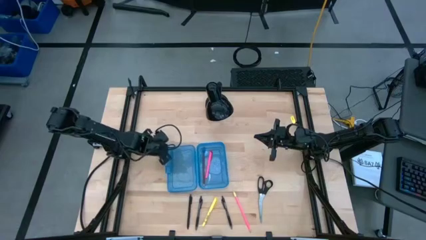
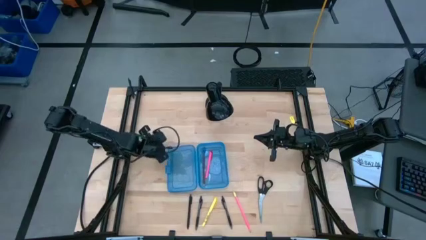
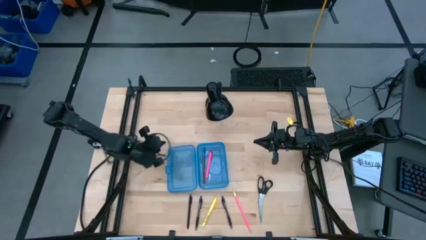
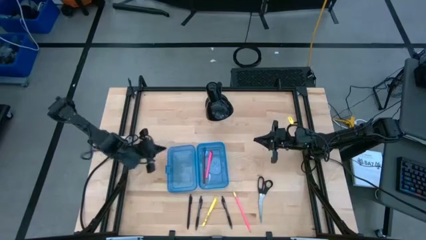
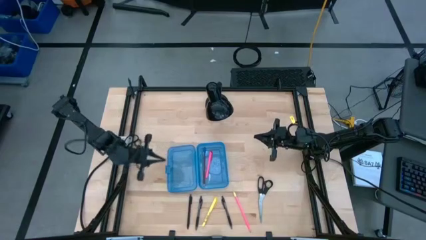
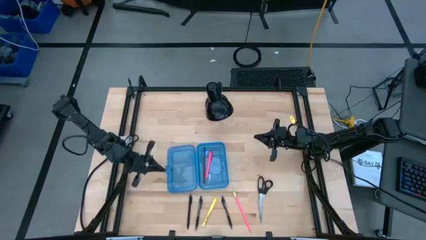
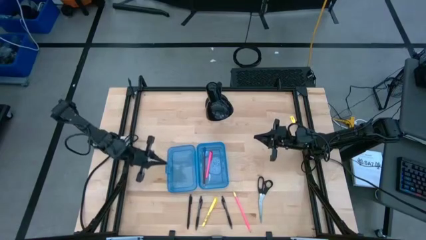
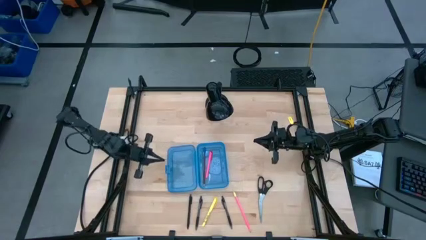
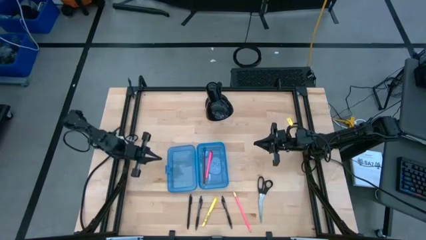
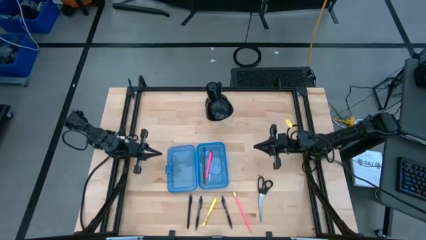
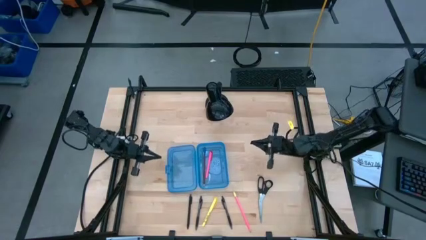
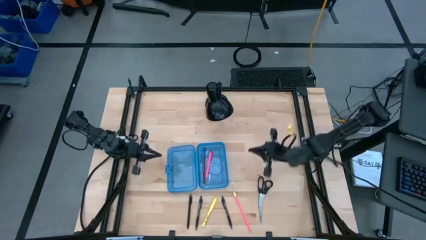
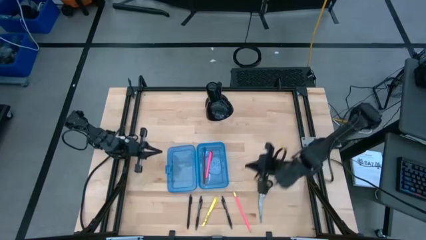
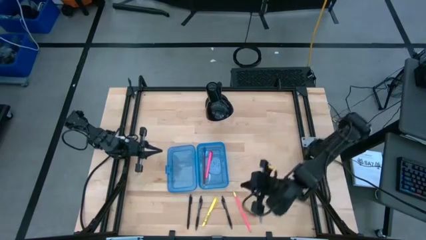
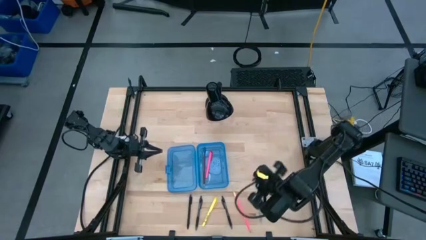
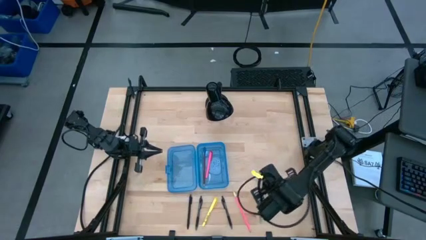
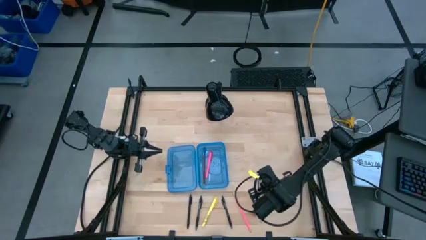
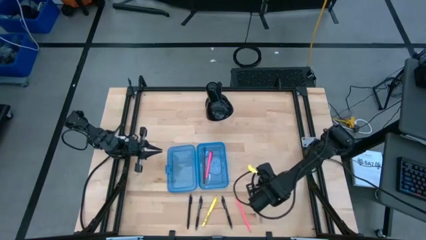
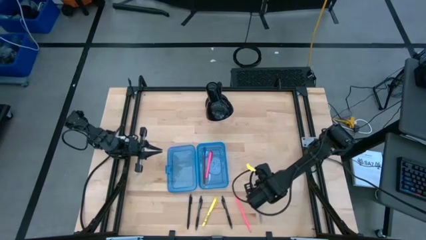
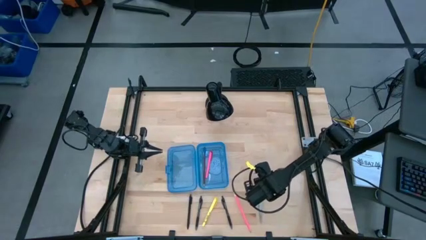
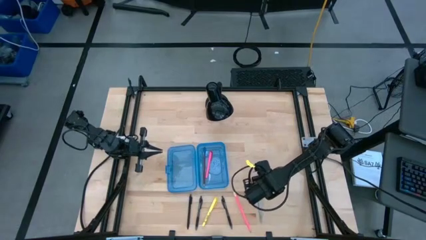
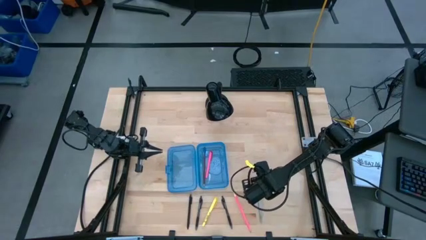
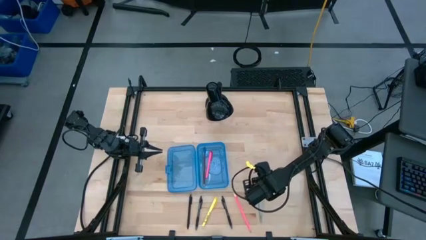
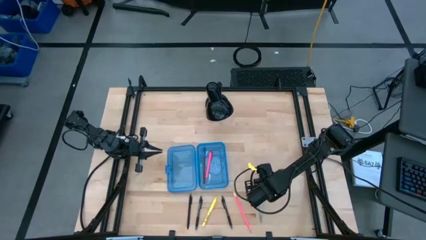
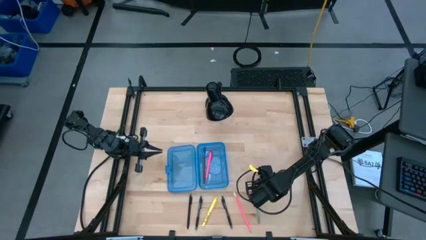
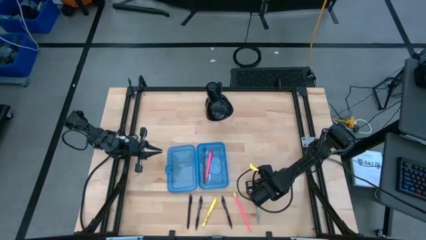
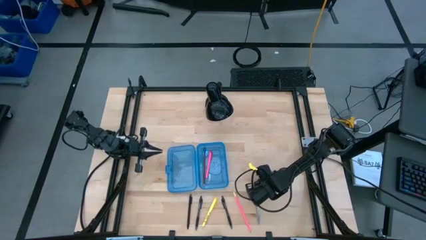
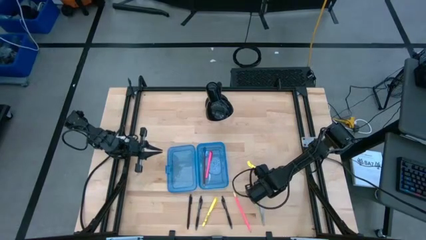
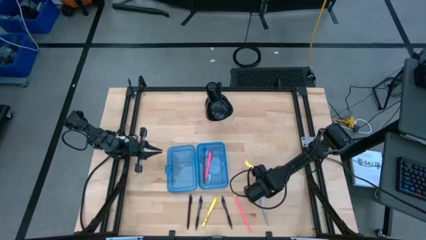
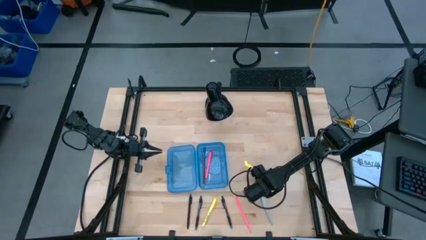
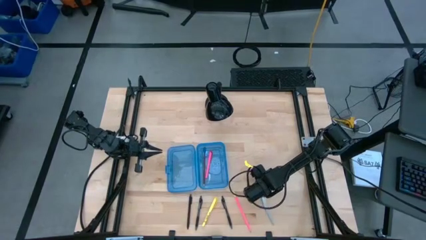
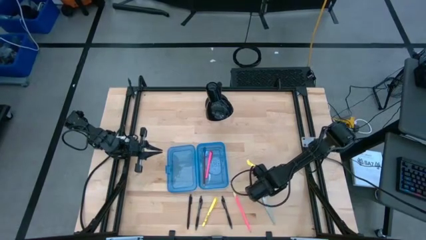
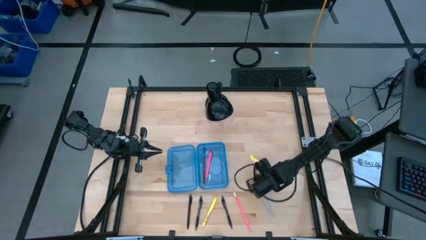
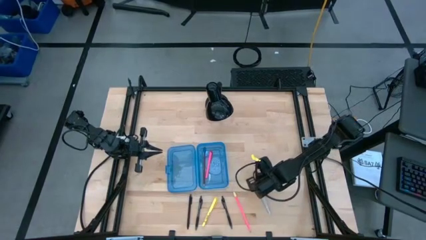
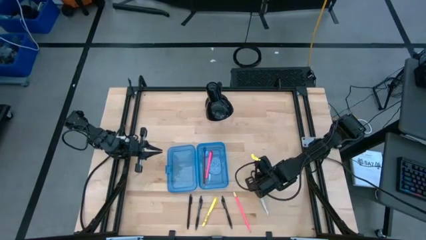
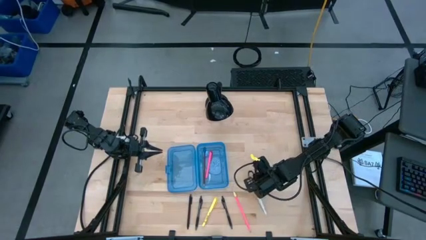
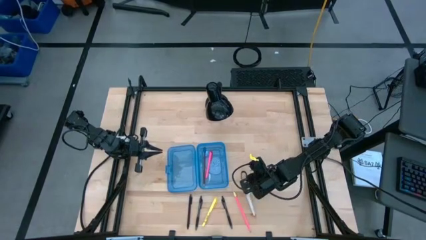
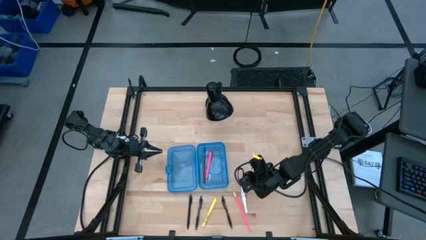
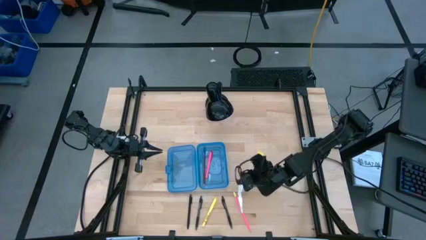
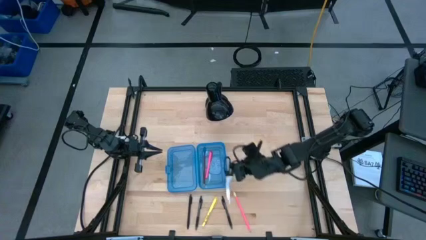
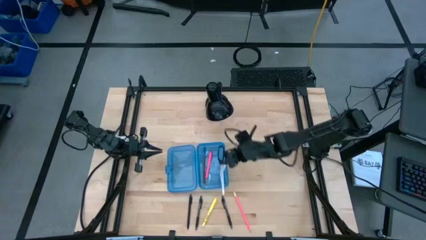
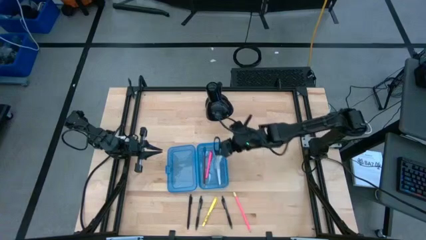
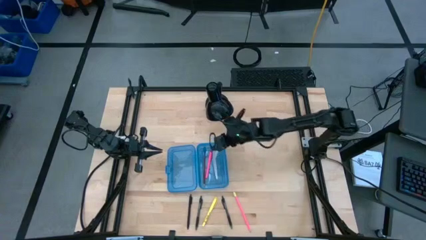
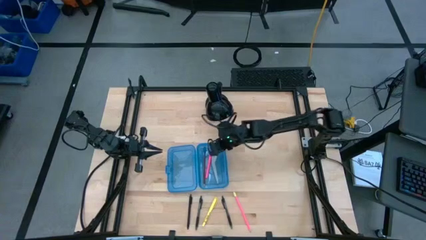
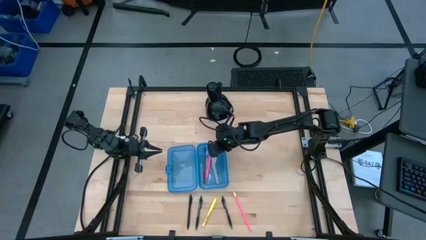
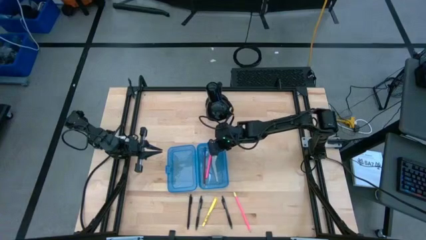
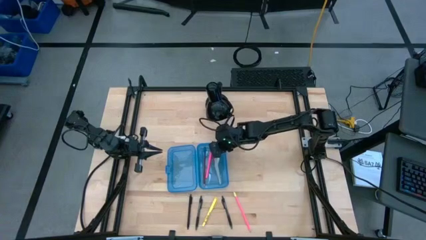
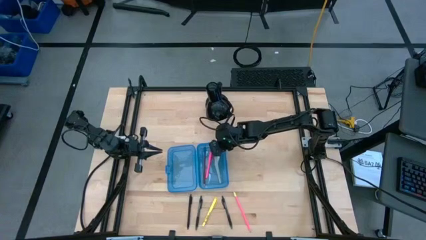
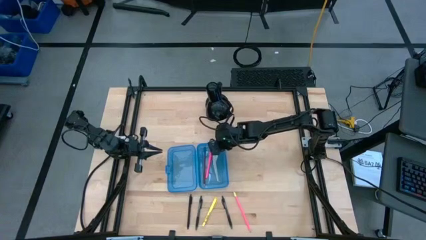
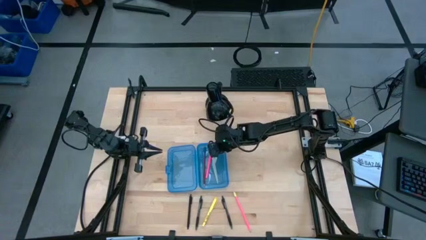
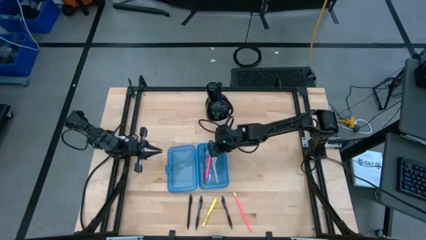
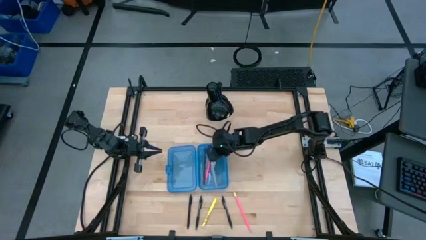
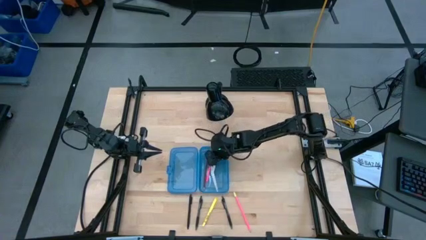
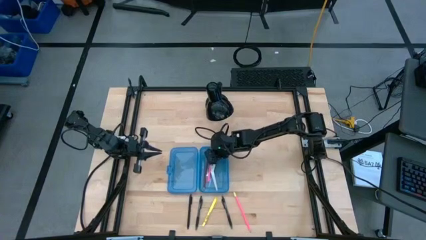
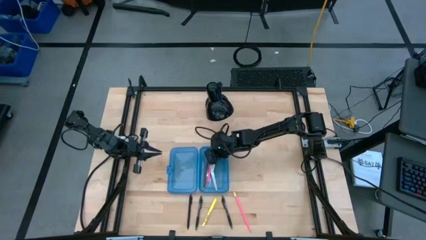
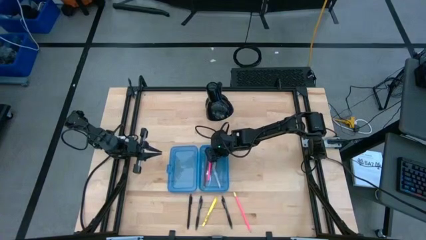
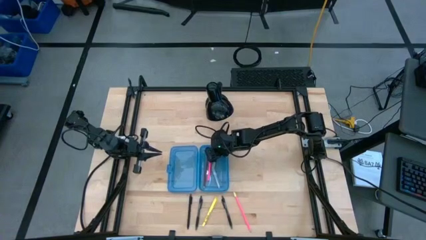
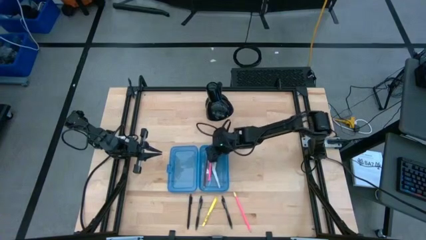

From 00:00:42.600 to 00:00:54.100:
Task: Pick & place school supplies into a supply box
Put the black scissors into the blue supply box

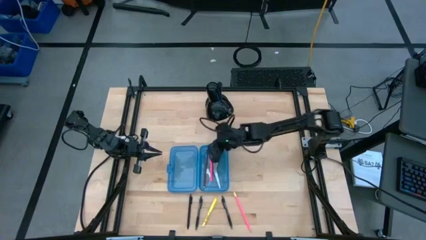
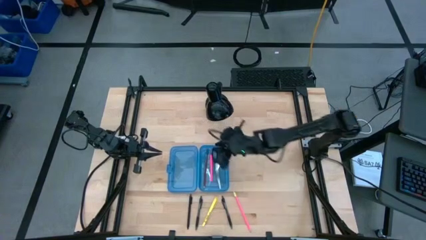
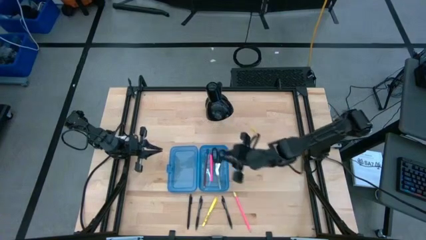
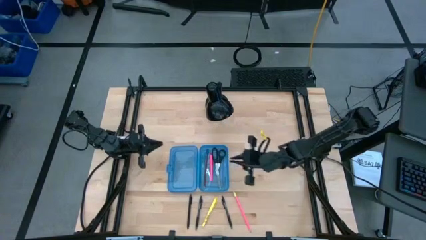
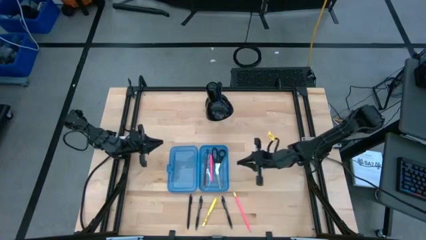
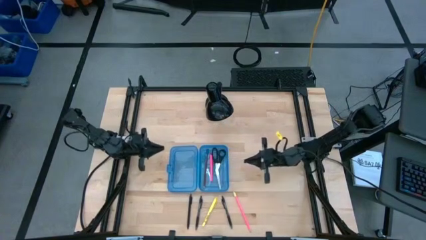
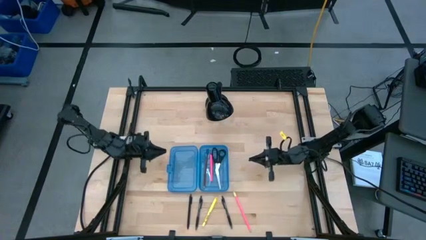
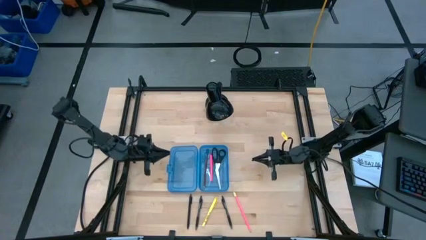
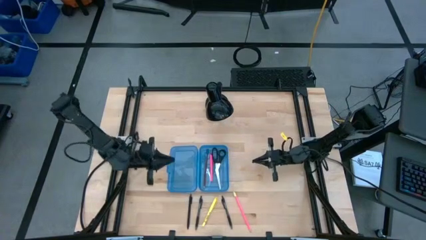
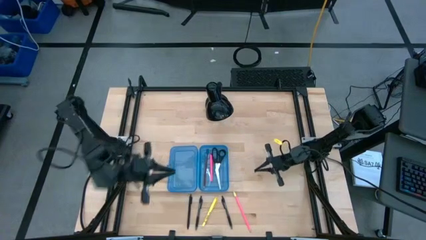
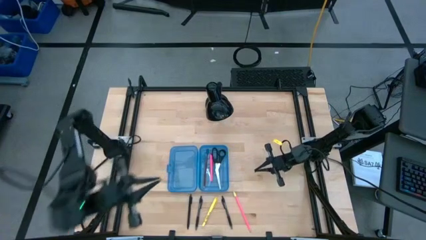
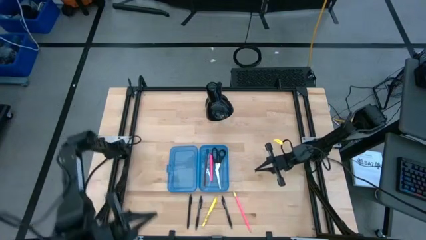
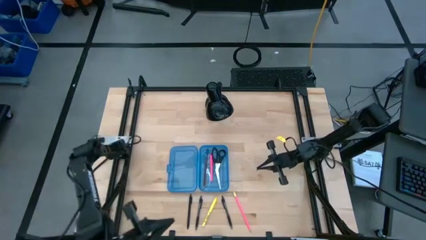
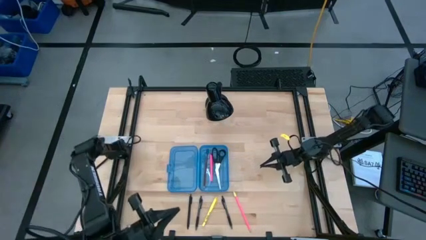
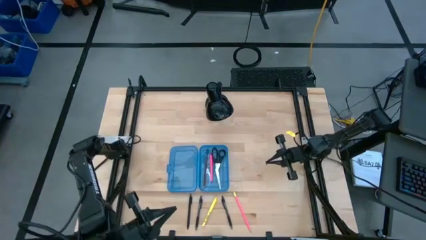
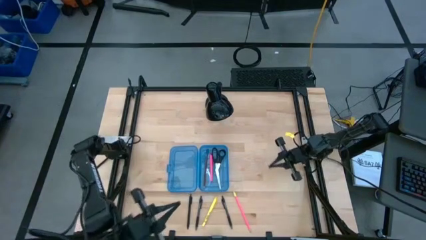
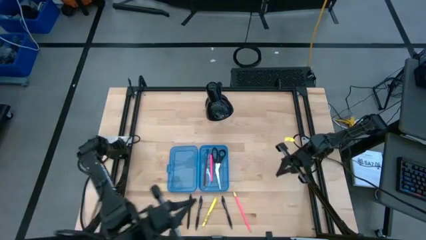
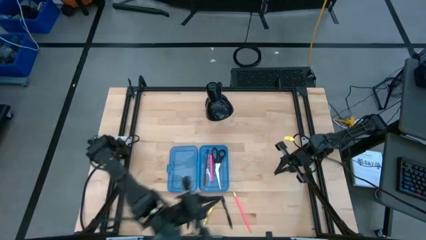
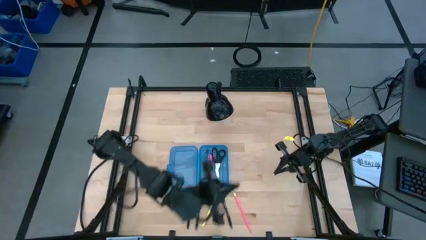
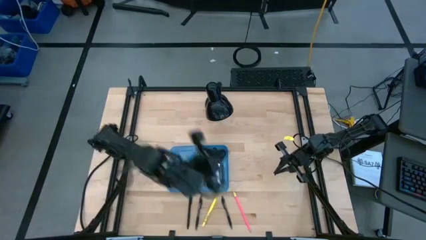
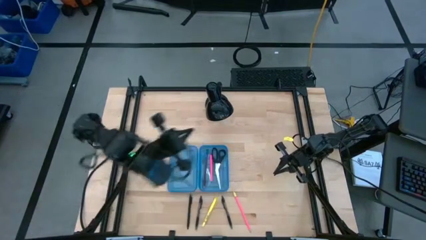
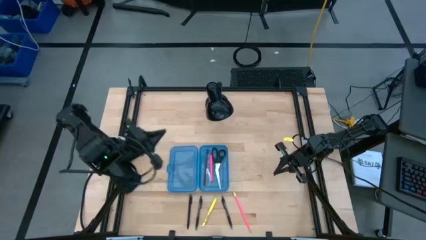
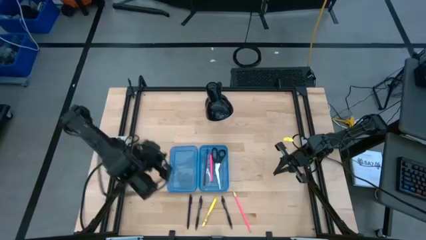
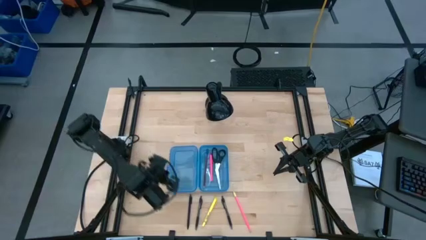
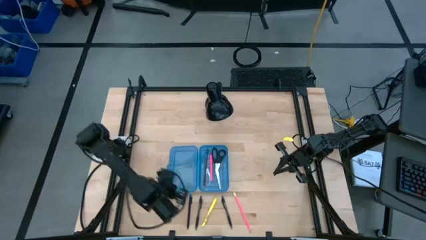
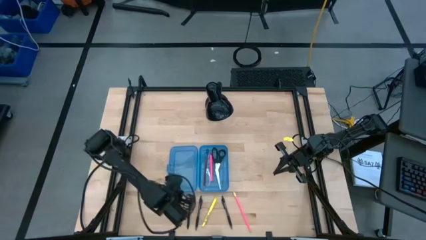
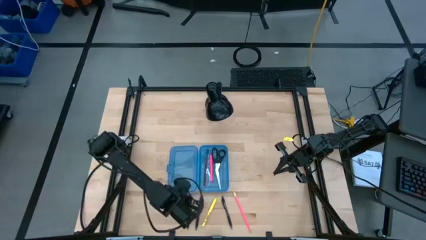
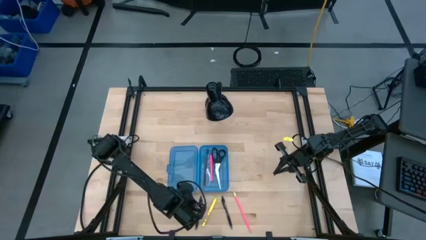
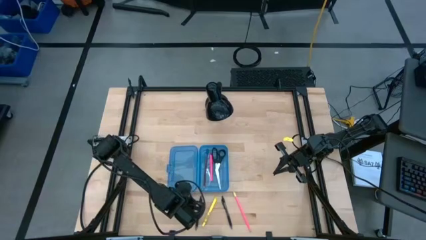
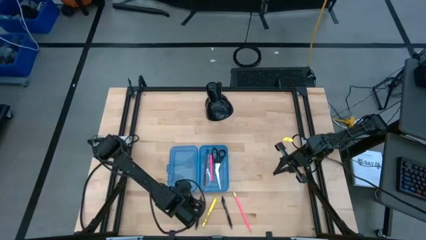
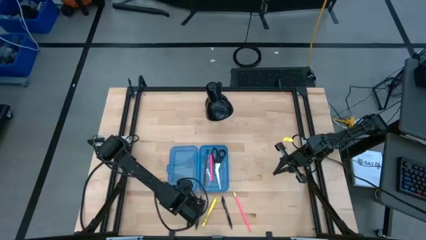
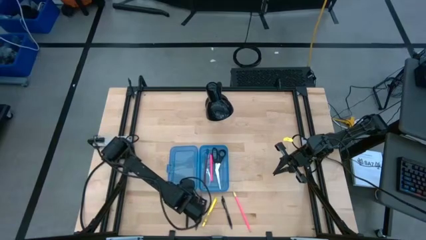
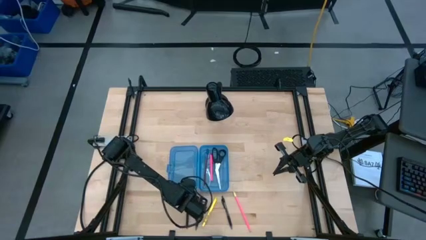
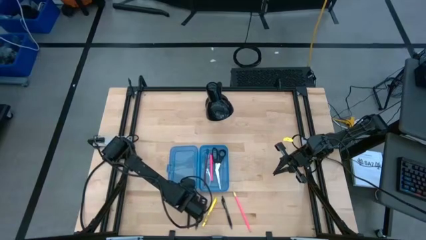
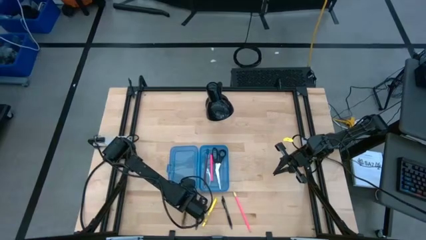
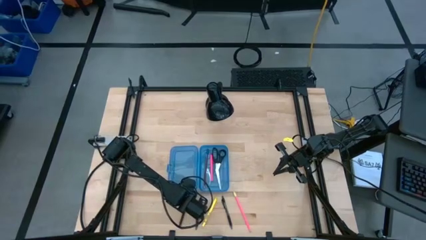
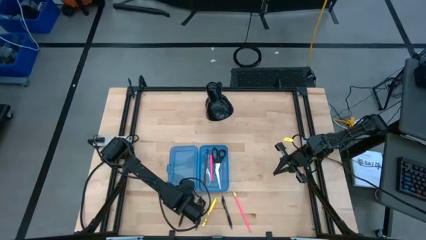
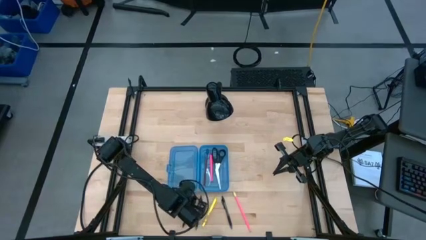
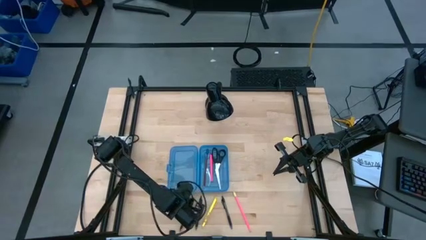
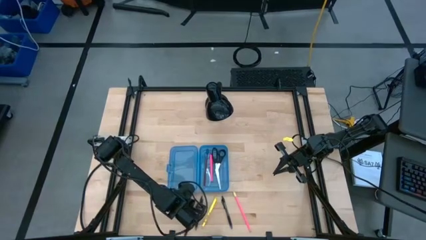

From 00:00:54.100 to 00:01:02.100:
Put the left black pen into the blue supply box
